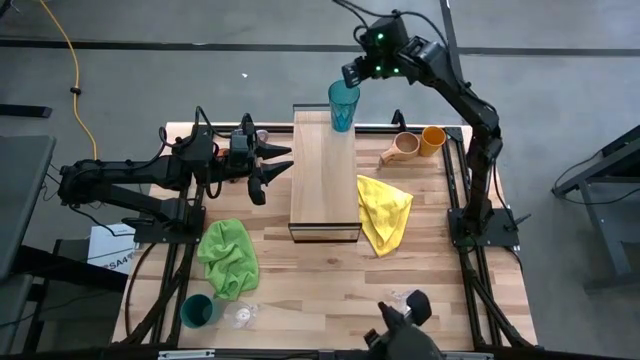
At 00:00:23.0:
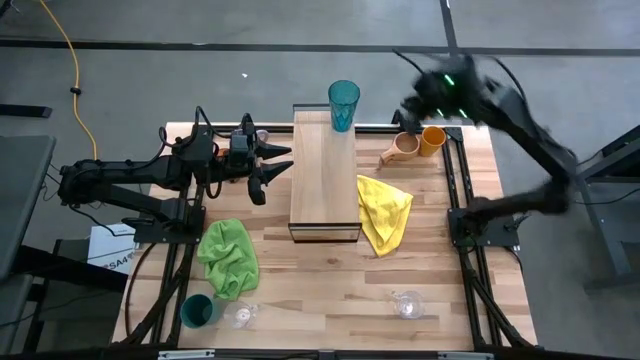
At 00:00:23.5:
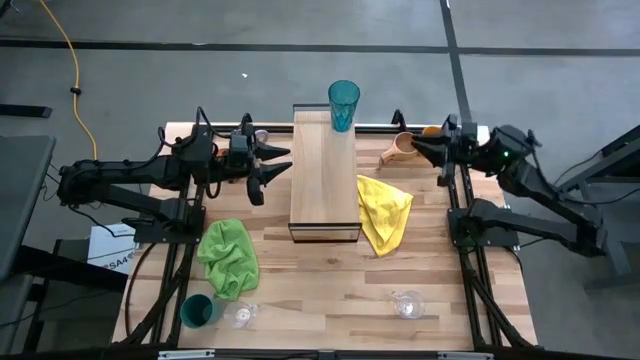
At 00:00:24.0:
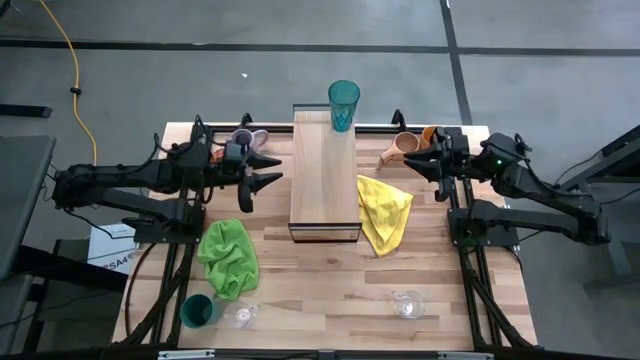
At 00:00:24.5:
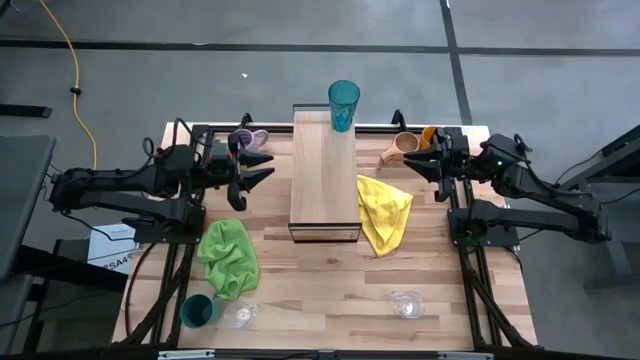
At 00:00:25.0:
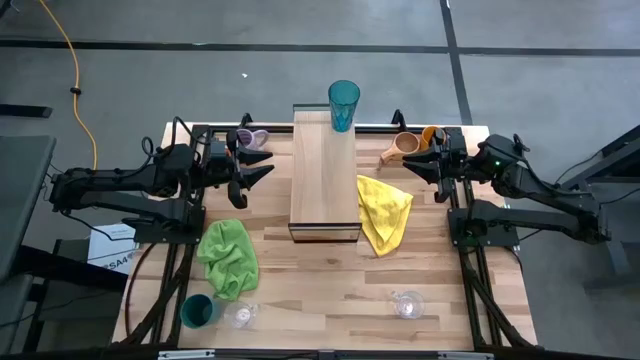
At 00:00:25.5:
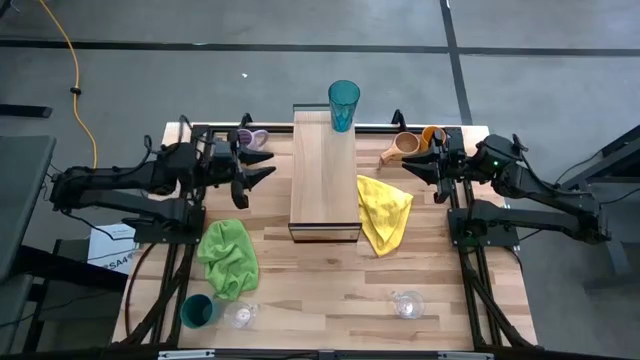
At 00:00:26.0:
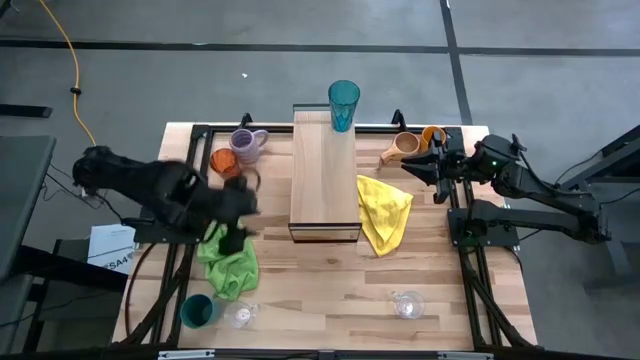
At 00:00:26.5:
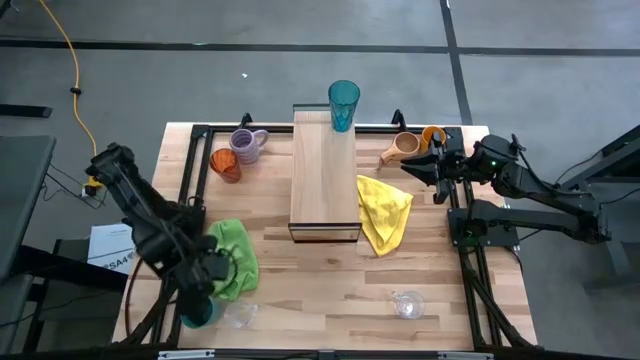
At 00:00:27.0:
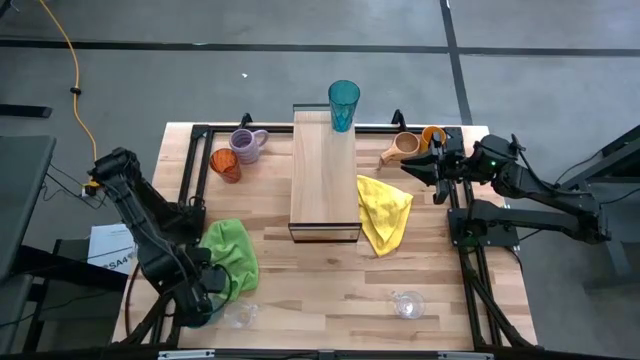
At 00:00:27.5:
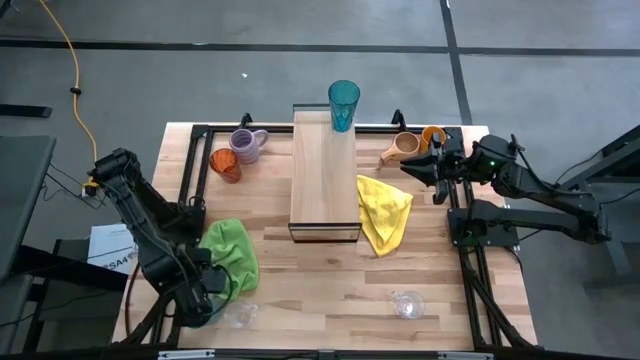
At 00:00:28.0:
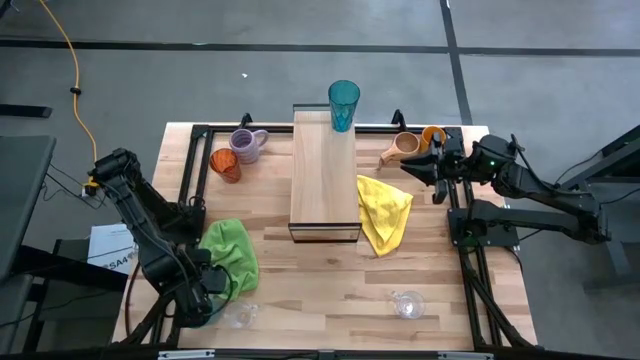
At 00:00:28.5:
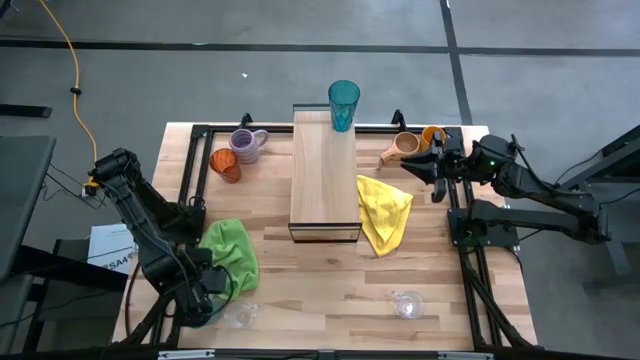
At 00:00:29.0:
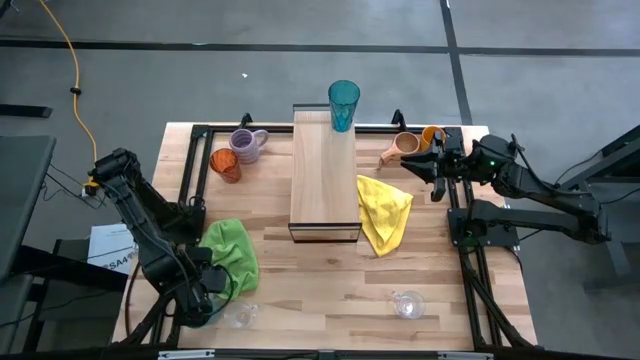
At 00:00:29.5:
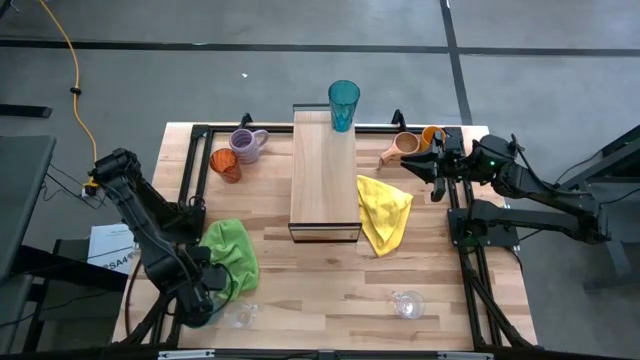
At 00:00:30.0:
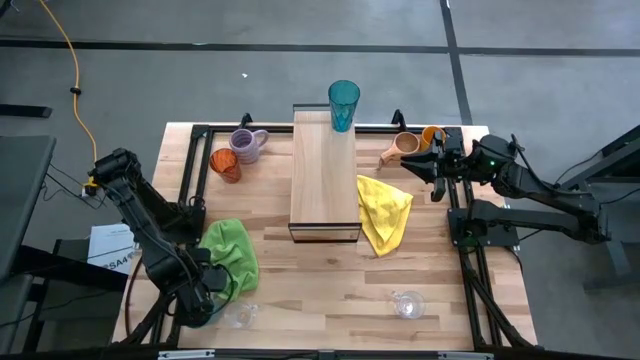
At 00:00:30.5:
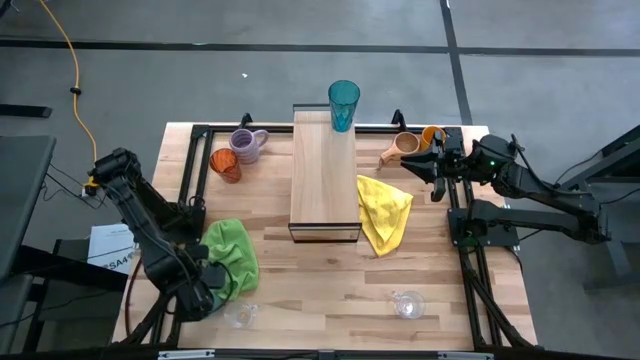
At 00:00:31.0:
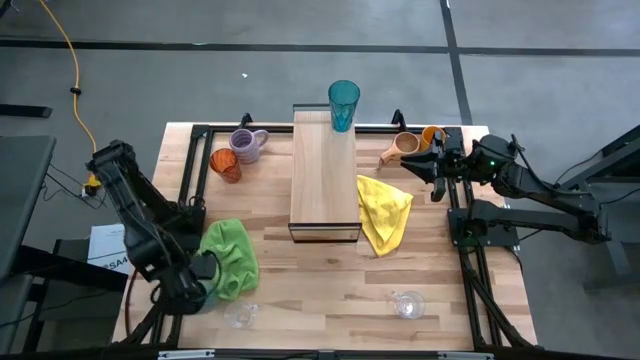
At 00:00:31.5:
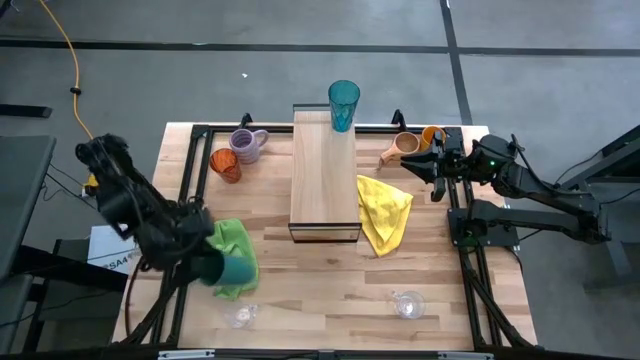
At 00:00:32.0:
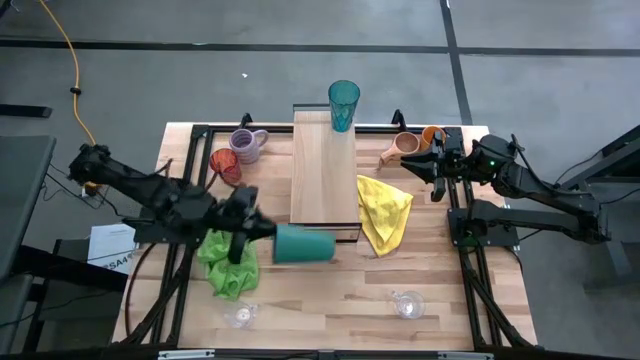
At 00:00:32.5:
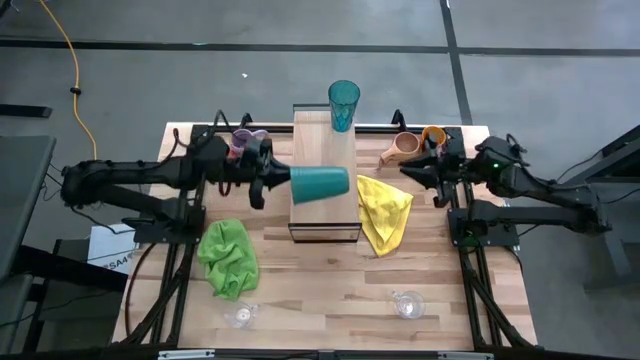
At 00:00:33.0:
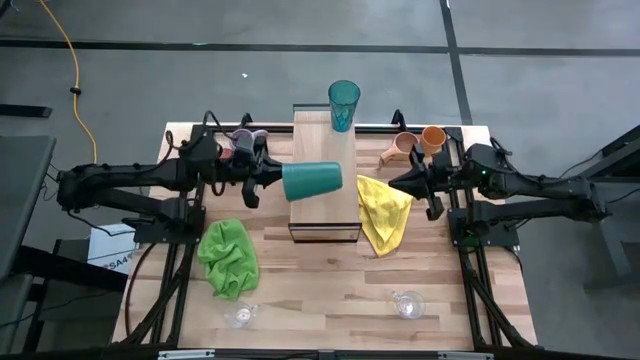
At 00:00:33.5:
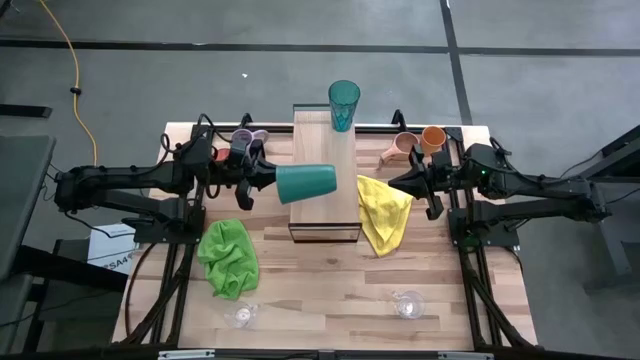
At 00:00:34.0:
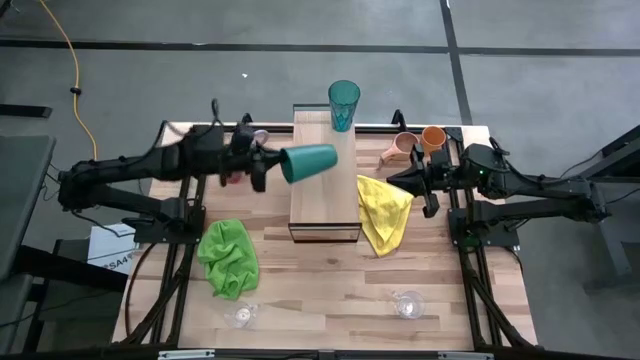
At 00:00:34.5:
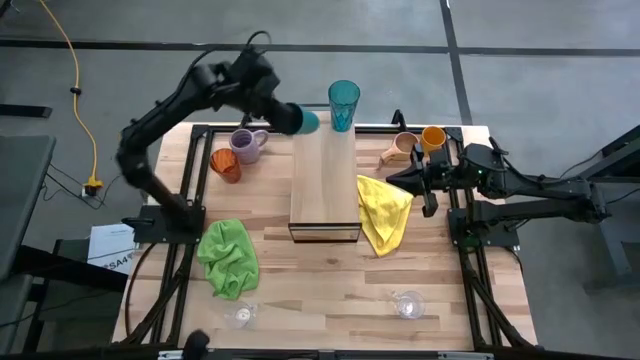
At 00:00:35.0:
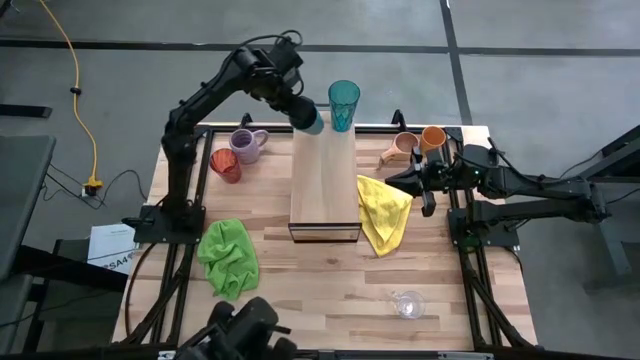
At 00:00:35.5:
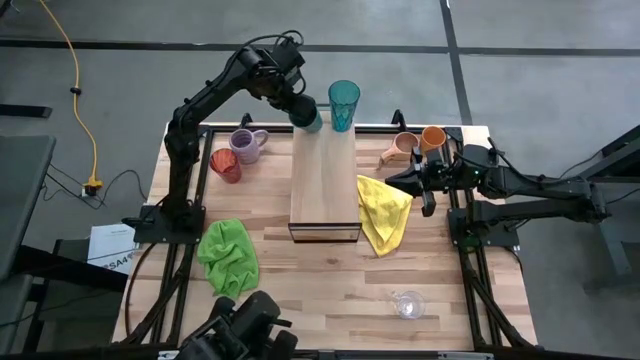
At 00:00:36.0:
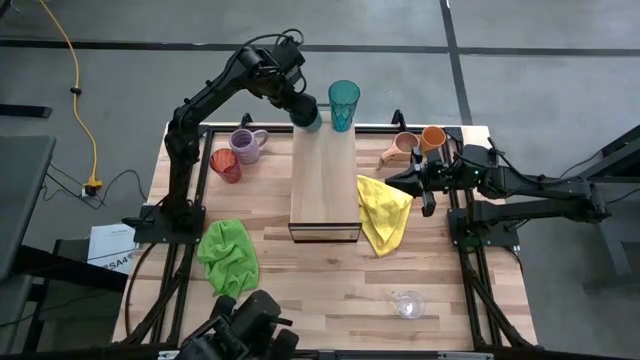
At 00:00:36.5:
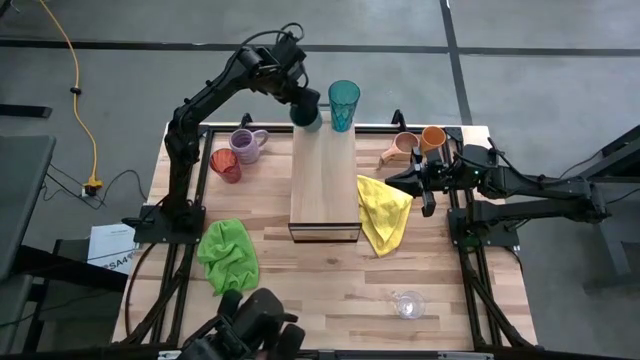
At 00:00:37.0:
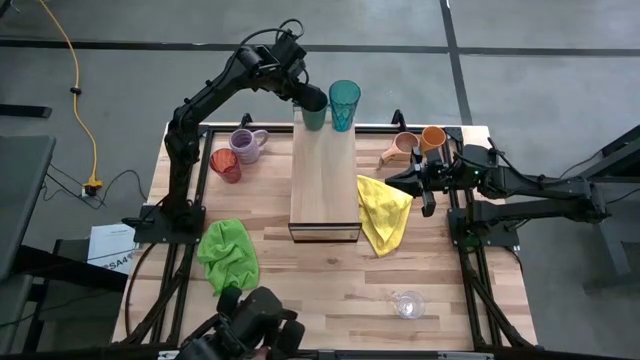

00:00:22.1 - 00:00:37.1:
Task: Stack small to large cups/mugs on shelf
Put the blue plastic cup on the shelf

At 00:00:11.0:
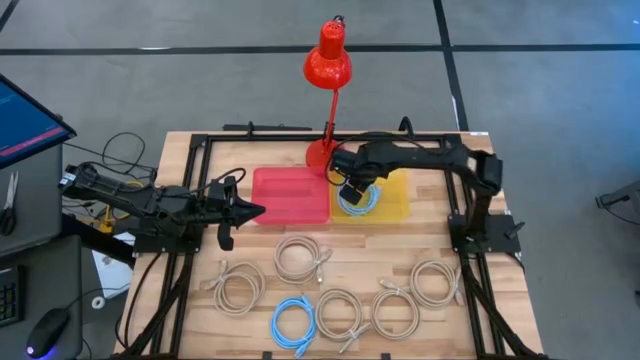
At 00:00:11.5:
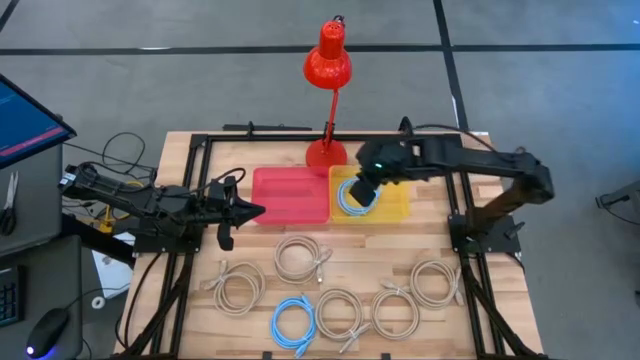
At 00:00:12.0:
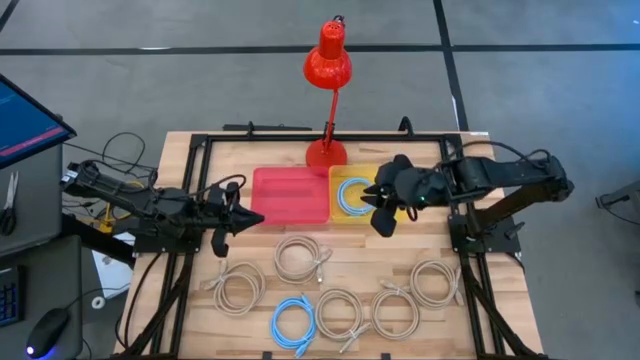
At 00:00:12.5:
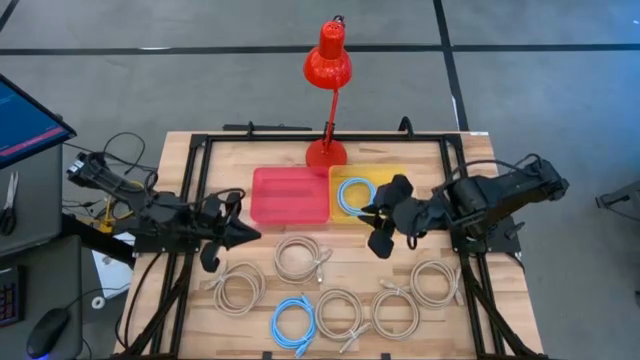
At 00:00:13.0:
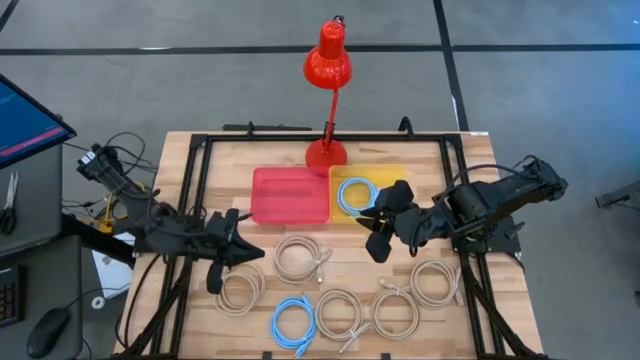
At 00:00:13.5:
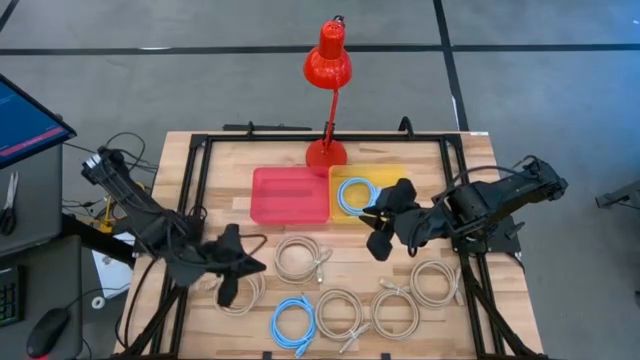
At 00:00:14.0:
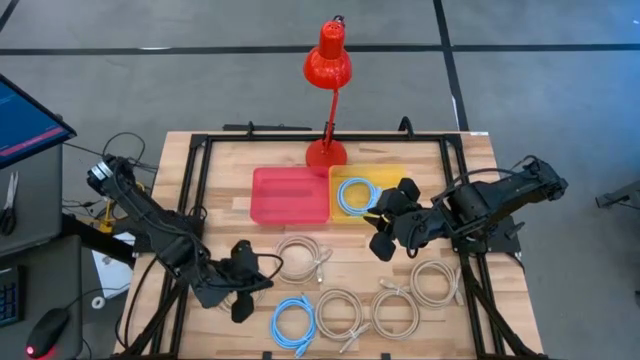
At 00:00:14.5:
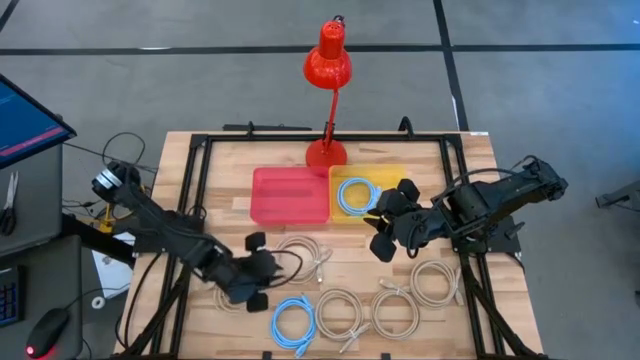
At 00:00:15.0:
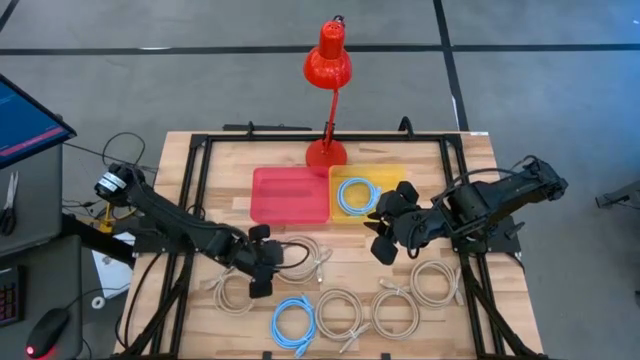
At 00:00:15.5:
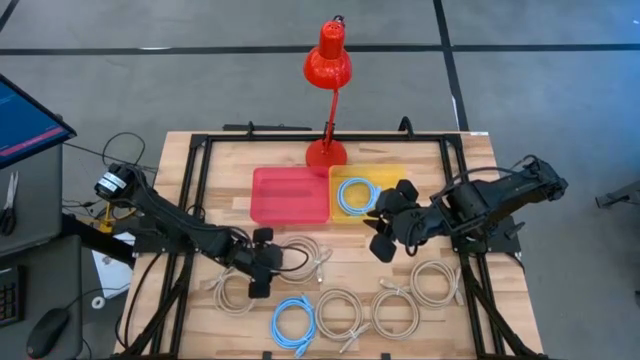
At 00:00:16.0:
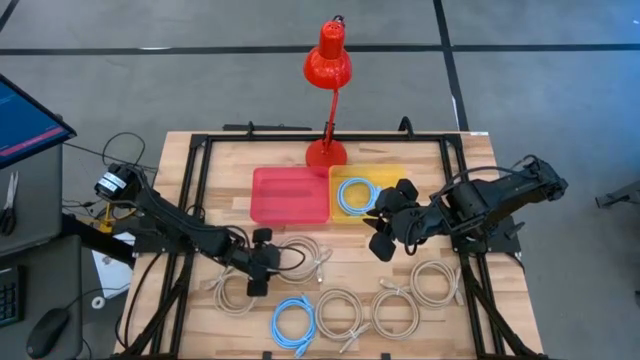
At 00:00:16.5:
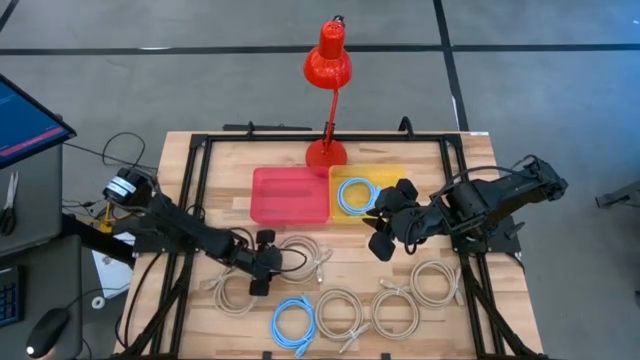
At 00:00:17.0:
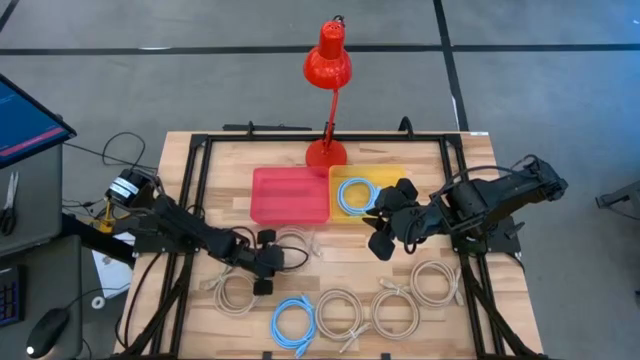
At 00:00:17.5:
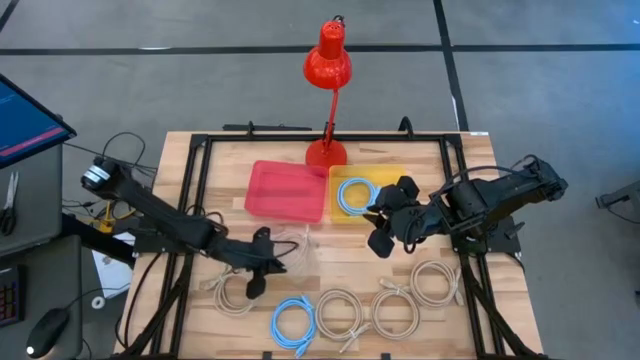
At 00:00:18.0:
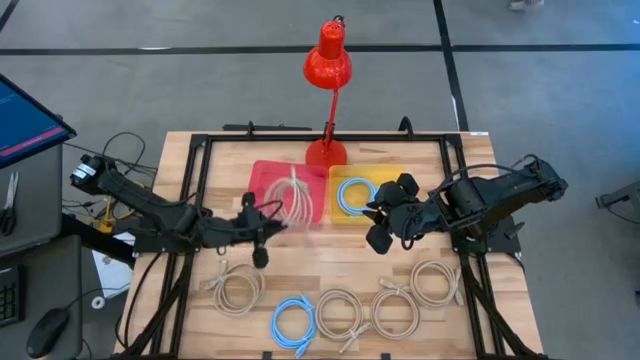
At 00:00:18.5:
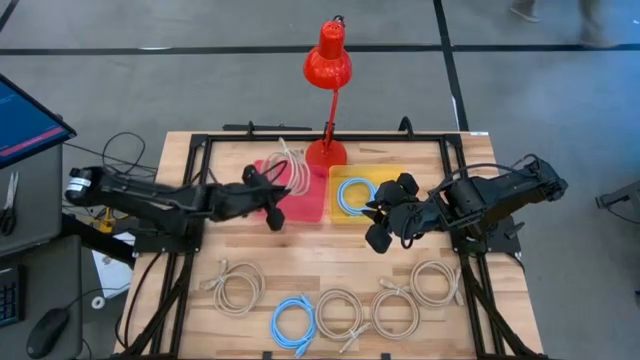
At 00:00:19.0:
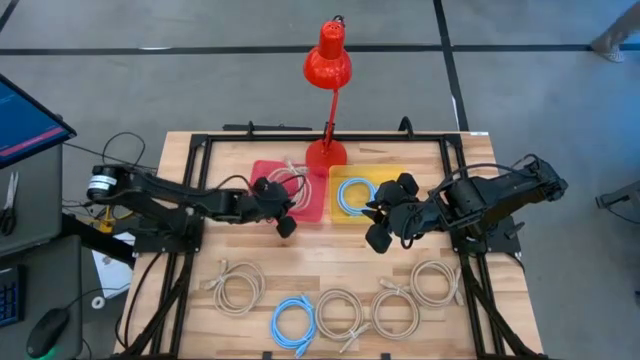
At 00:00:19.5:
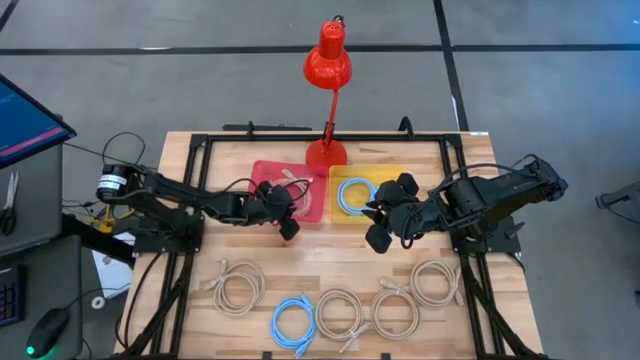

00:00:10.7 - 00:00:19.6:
Task: Sort HDMI cables
Put the brown HDMI cable into the red bin
